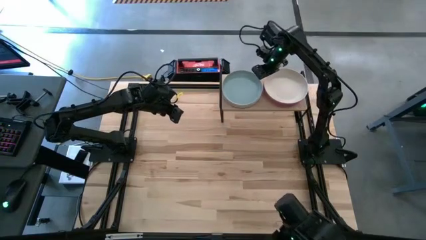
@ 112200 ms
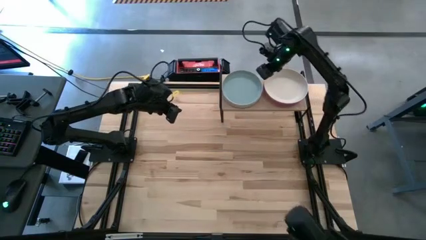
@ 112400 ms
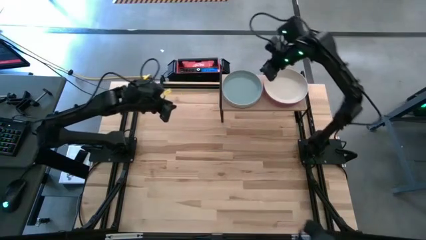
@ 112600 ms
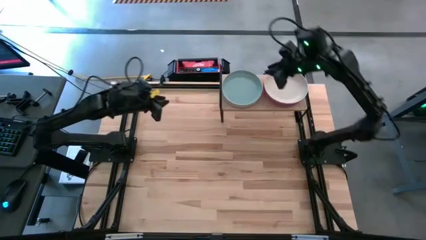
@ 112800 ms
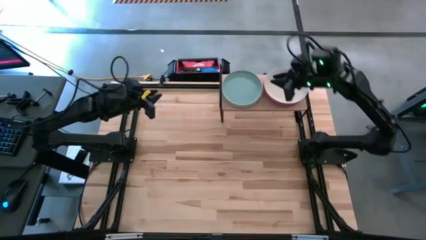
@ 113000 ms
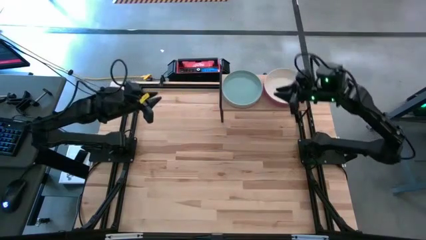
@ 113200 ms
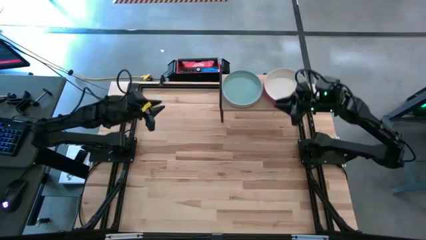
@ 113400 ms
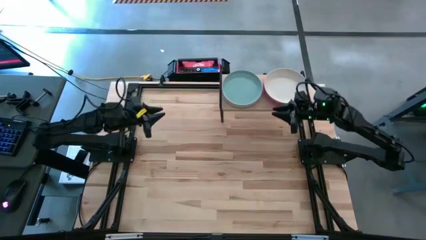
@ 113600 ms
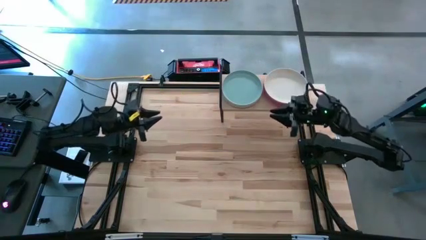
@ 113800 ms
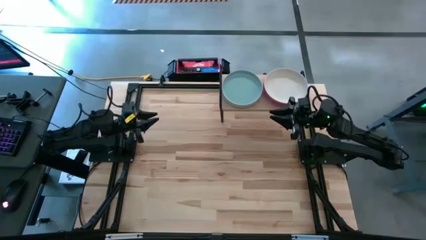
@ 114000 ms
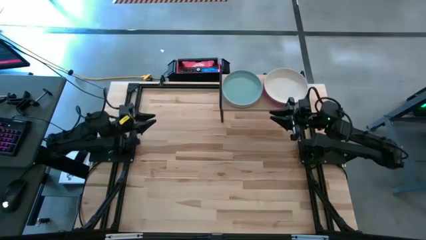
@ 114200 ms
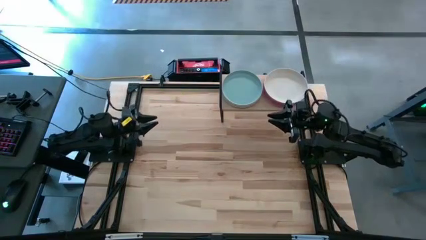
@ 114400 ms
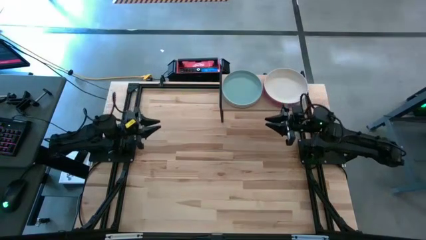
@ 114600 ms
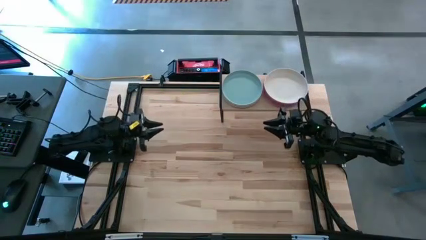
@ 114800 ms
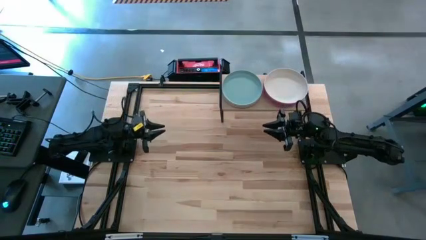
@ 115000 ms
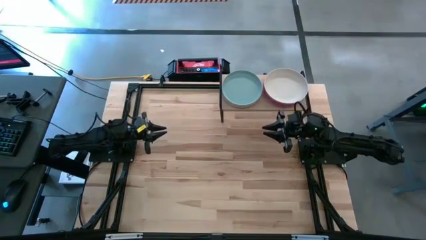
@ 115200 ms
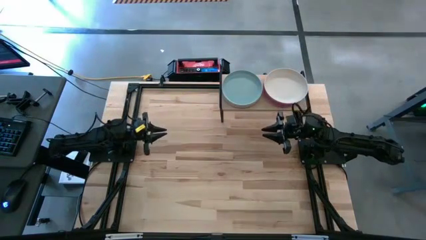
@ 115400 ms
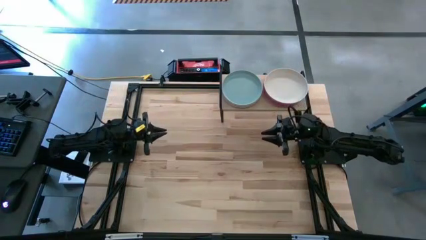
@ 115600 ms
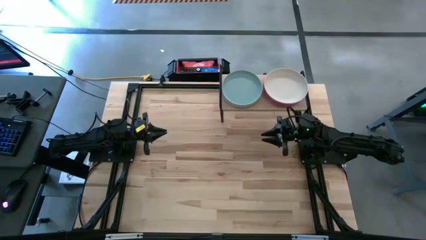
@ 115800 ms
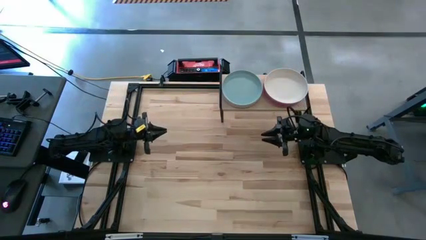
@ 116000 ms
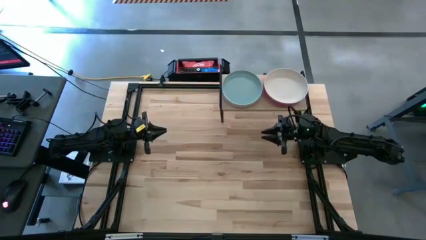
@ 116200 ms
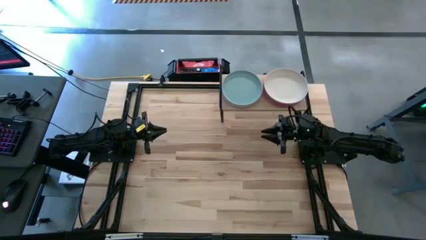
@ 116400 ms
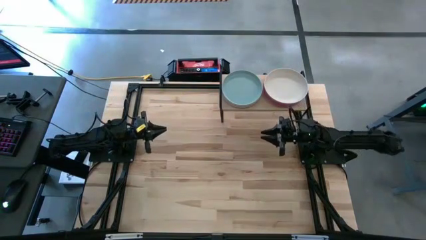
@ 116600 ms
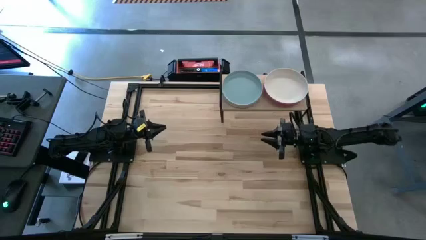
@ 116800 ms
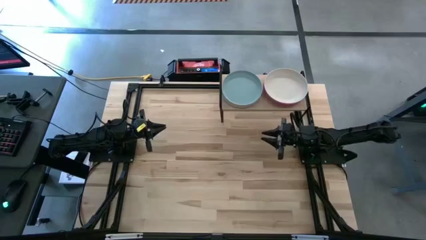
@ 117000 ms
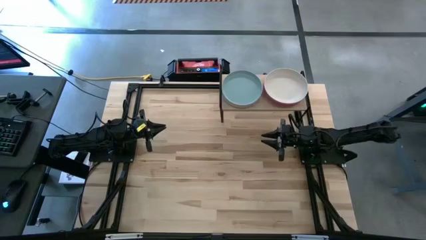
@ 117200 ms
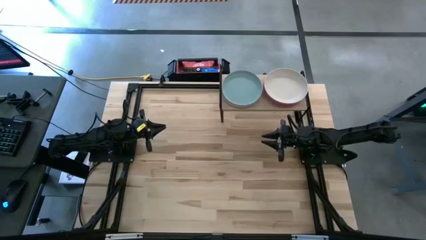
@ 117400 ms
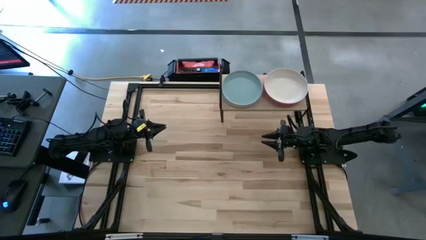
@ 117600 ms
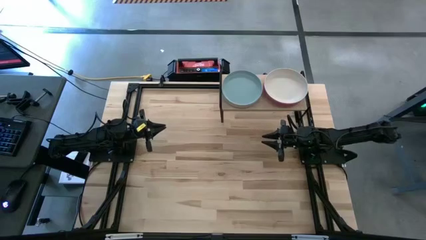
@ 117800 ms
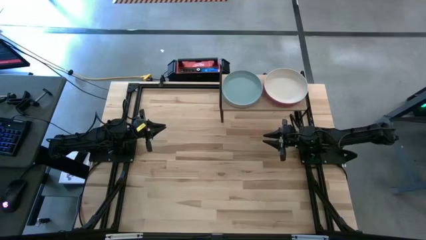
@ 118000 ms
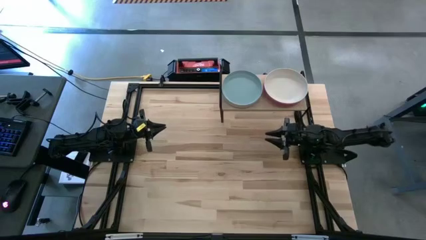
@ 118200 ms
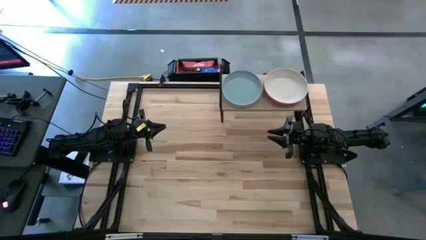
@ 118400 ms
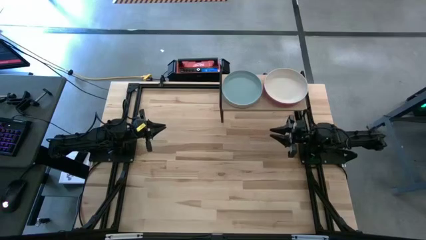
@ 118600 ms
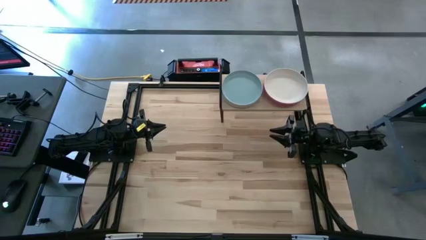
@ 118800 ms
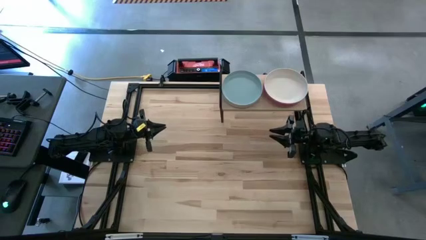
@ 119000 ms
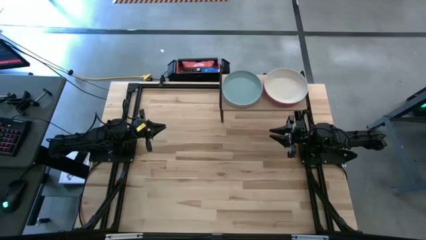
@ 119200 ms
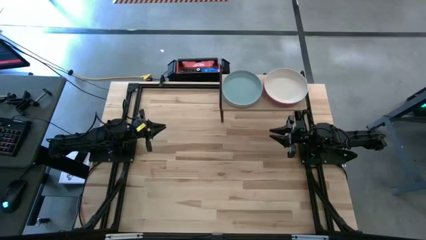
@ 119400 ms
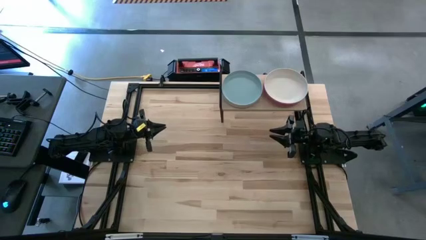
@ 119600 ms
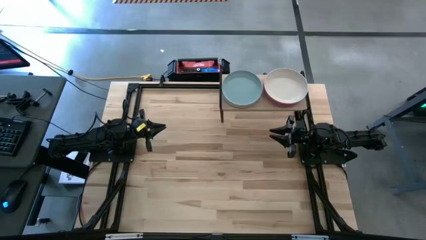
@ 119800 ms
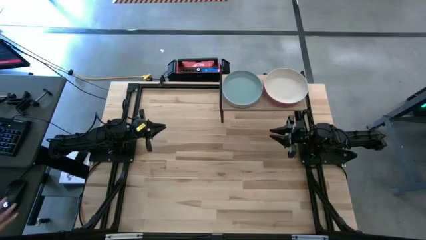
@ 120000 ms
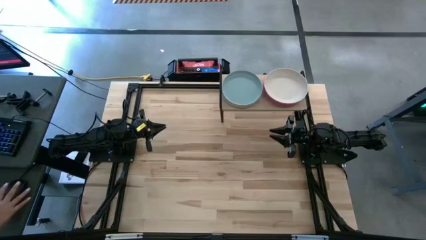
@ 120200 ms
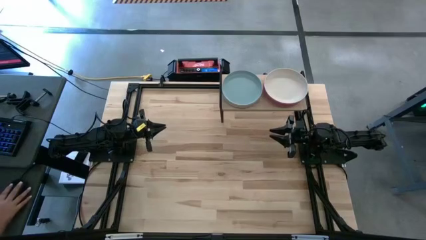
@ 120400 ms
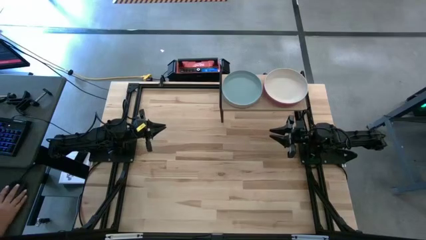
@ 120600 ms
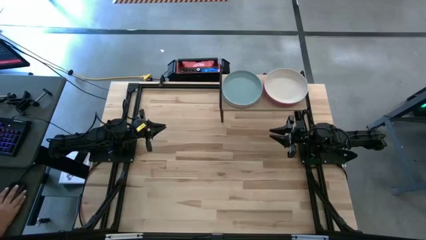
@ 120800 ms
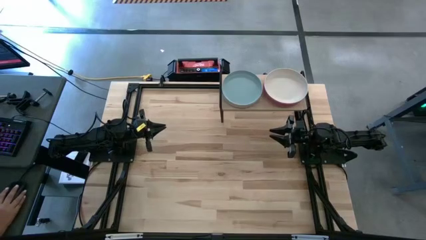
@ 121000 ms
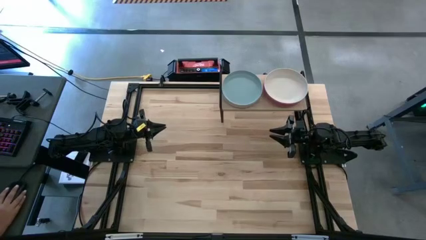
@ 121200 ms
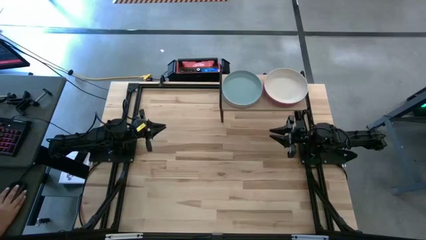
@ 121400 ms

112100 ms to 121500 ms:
Task: Place and stack plates onto a shelf
Return to Home Position

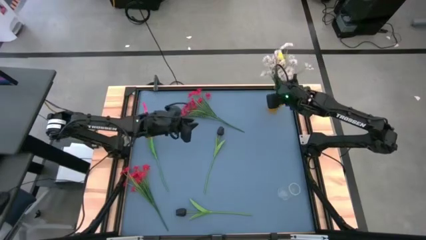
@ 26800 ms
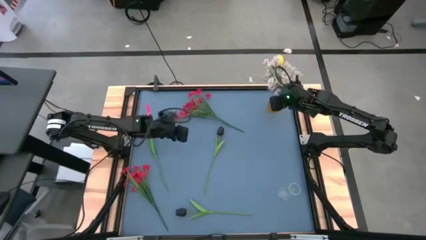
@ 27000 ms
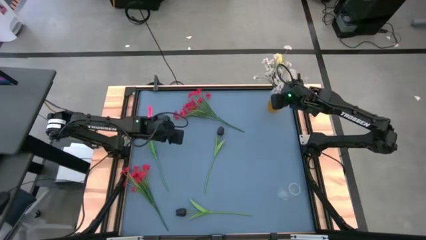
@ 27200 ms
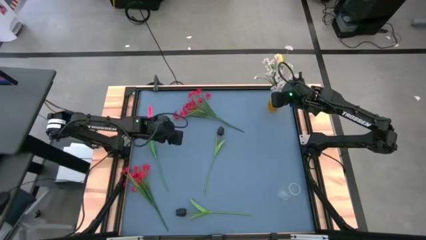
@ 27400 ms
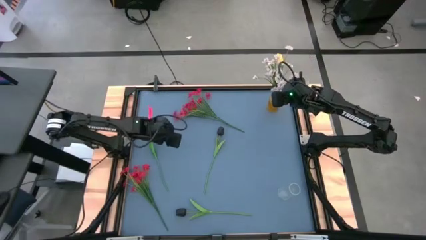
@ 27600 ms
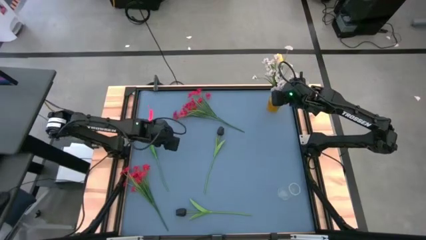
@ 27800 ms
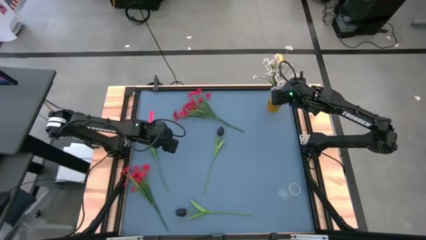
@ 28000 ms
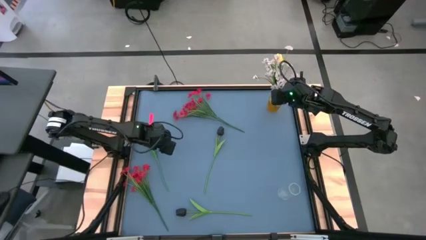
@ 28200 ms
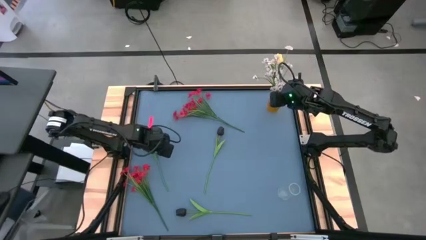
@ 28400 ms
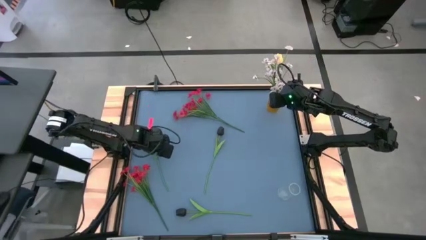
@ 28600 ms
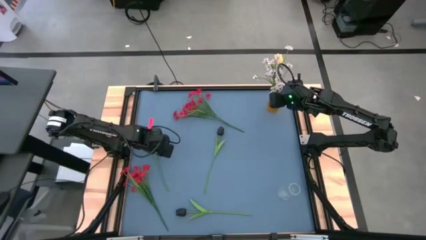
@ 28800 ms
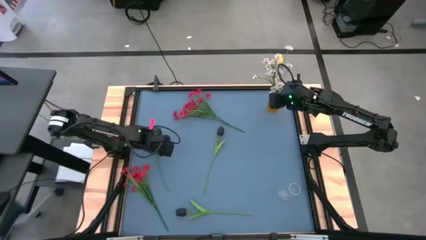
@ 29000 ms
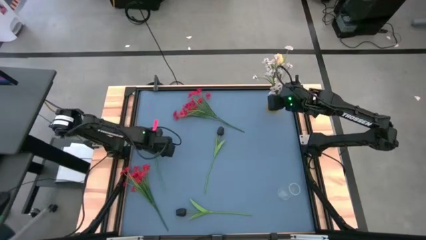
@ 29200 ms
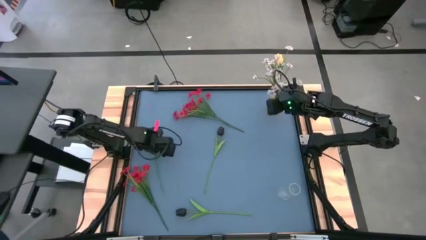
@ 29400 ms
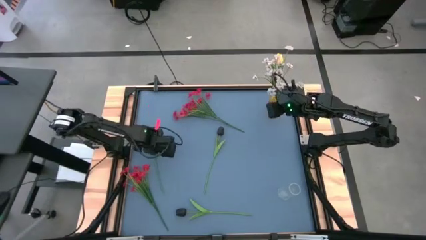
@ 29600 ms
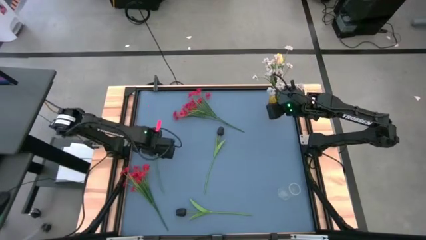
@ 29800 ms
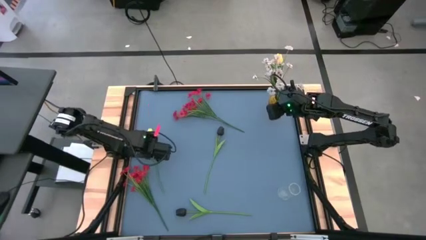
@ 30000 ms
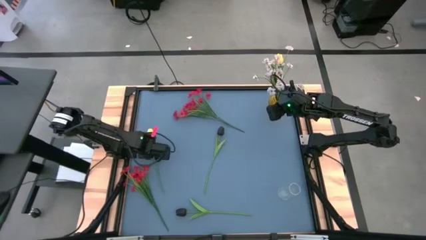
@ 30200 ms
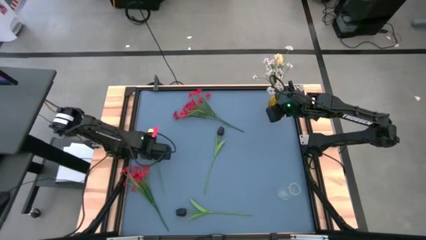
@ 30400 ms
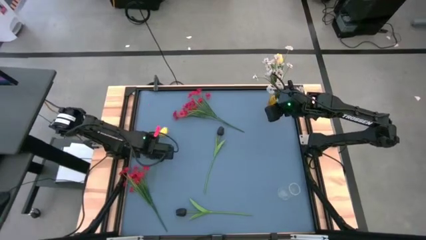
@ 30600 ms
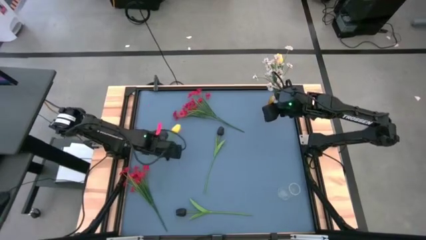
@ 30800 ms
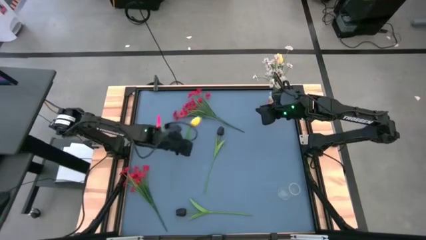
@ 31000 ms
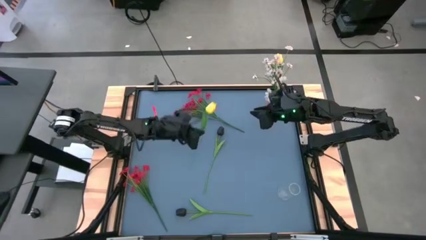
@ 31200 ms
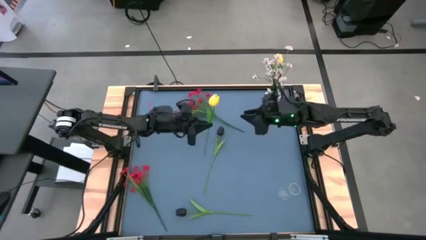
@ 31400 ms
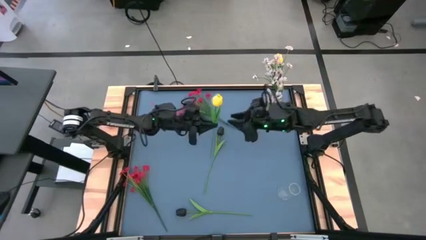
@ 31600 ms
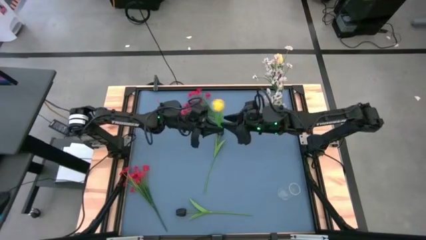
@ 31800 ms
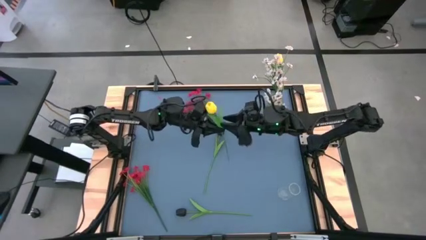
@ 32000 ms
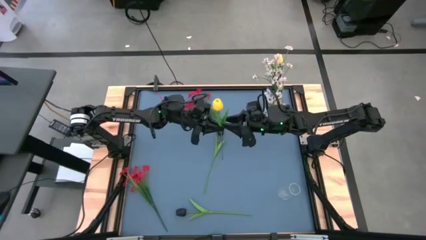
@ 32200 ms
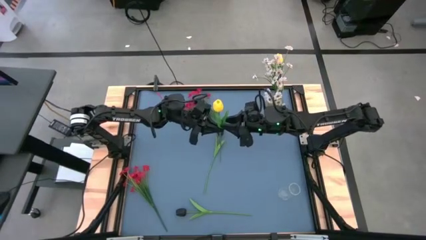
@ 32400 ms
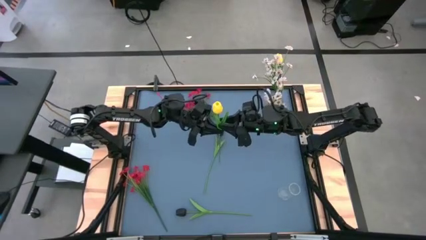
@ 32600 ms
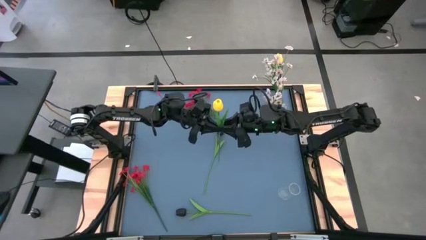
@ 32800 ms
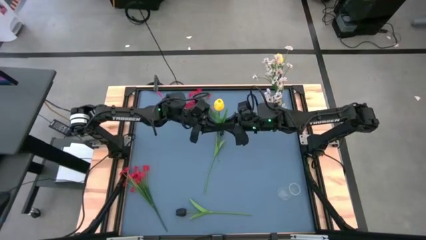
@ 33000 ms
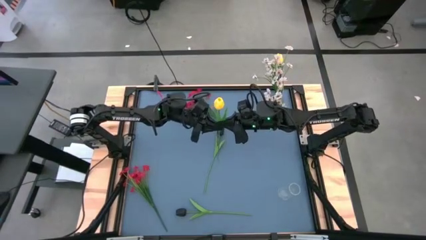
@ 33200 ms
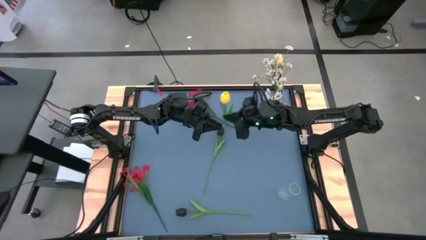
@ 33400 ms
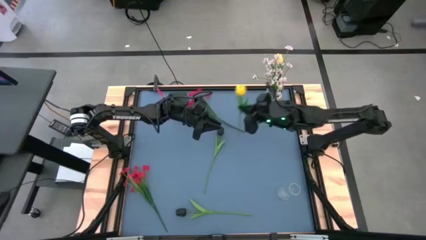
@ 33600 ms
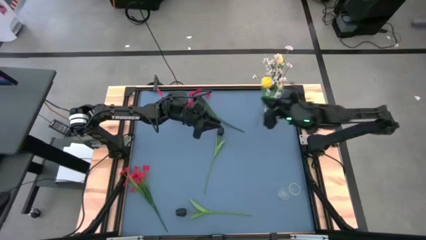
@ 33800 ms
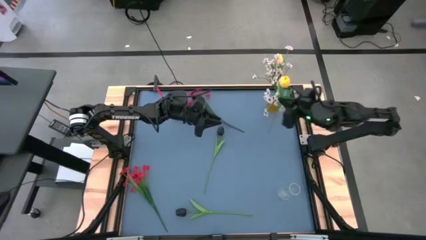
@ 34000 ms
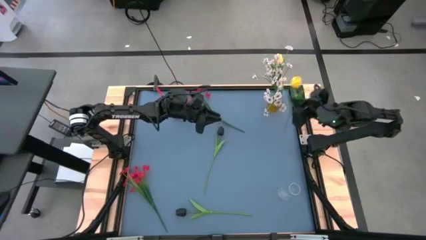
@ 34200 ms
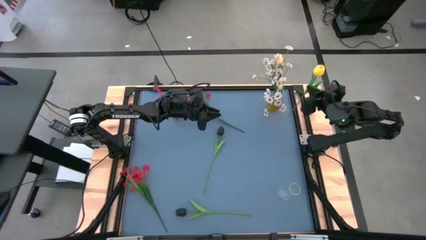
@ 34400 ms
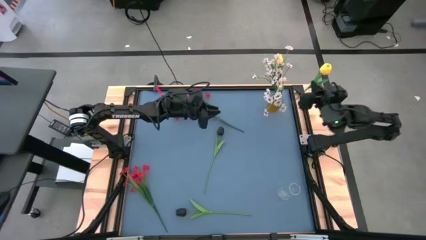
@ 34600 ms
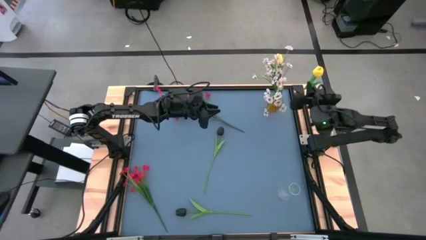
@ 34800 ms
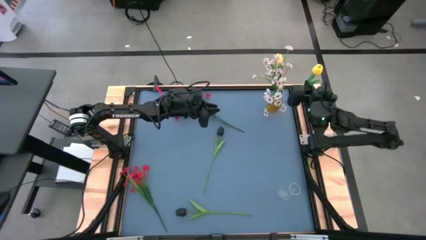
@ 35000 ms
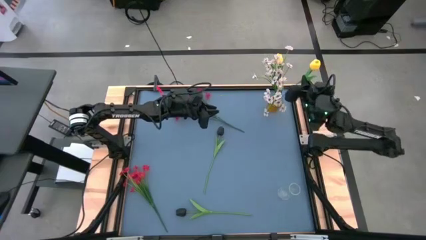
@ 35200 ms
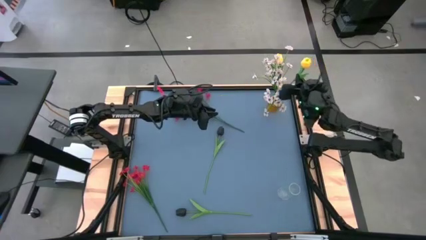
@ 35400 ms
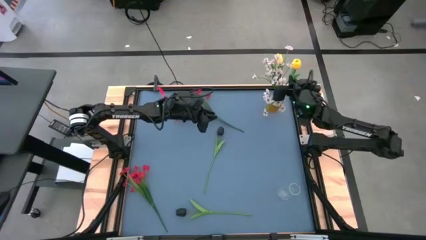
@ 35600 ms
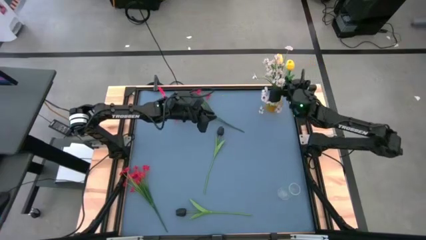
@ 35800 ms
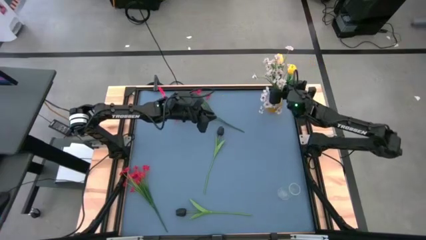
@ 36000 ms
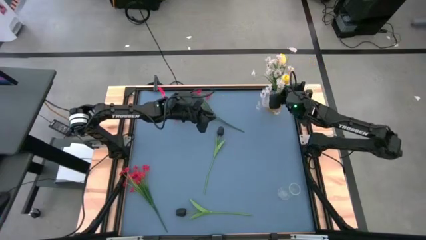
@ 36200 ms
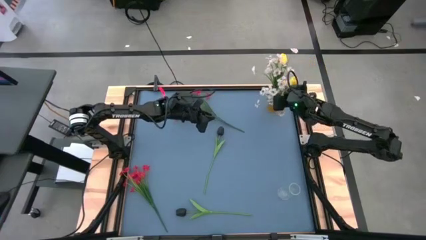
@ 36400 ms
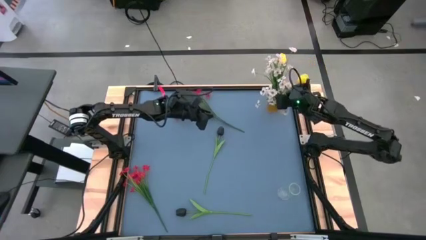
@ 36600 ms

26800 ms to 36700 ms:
Task: Sort flowers into vase by color
Put the yellow flower into the yellow vase
